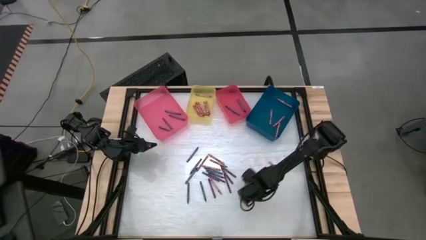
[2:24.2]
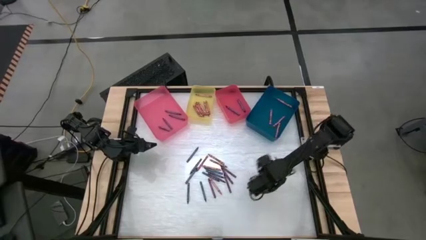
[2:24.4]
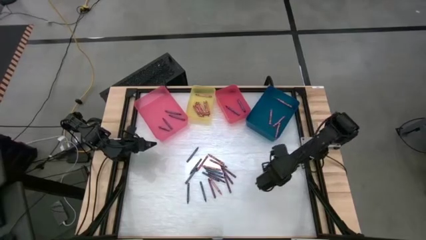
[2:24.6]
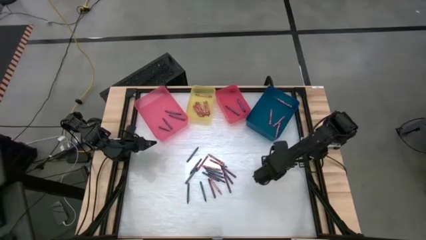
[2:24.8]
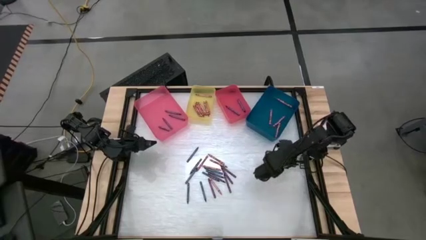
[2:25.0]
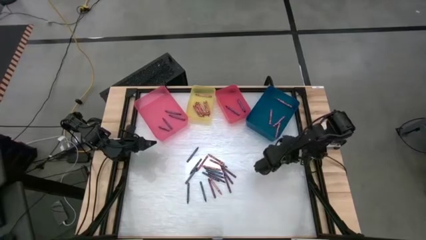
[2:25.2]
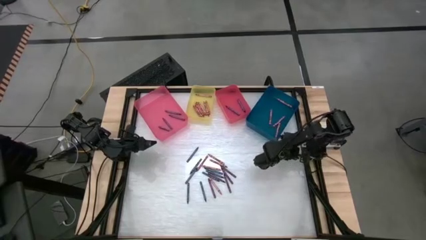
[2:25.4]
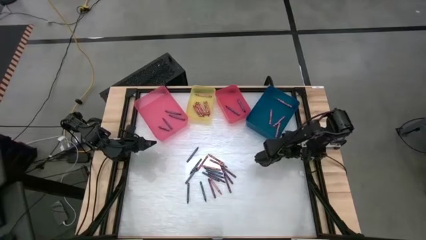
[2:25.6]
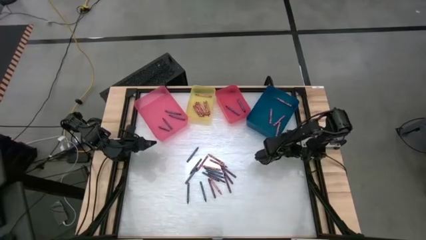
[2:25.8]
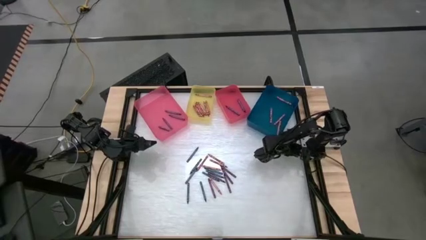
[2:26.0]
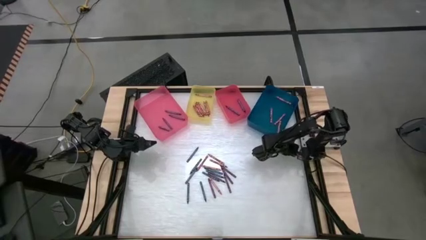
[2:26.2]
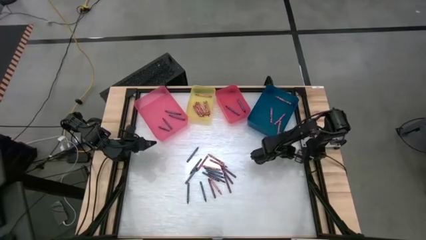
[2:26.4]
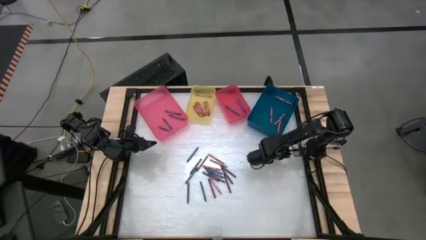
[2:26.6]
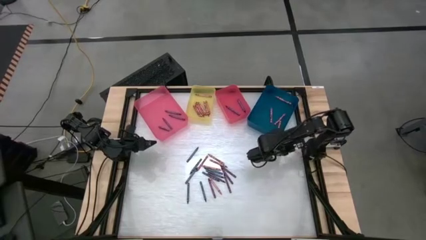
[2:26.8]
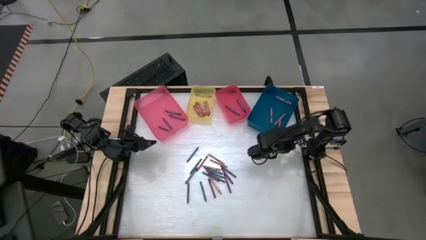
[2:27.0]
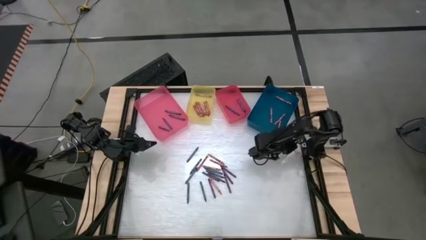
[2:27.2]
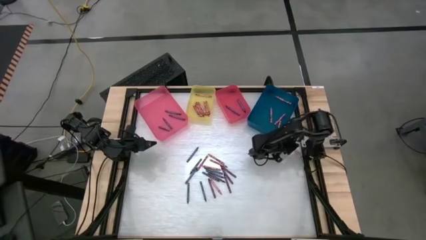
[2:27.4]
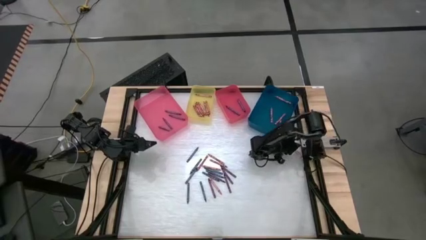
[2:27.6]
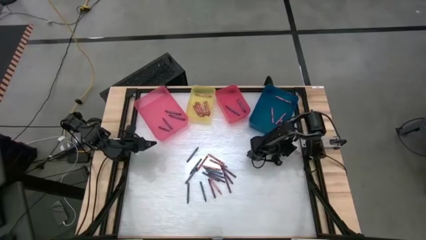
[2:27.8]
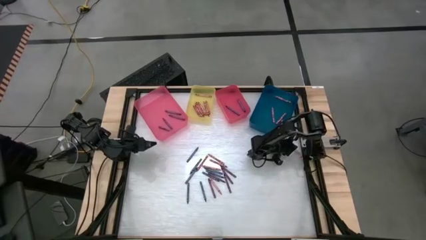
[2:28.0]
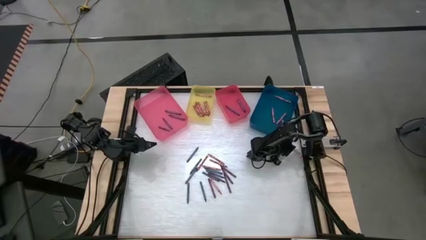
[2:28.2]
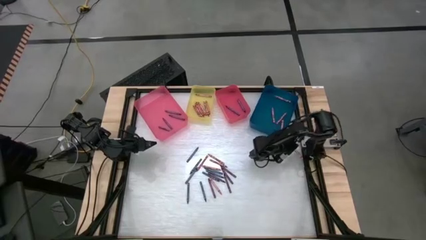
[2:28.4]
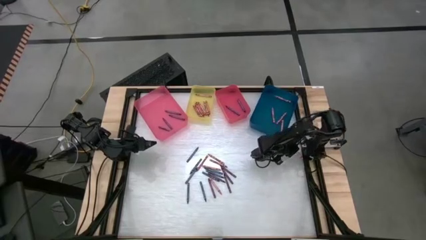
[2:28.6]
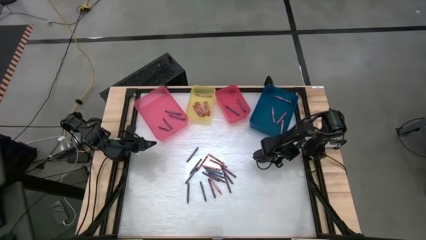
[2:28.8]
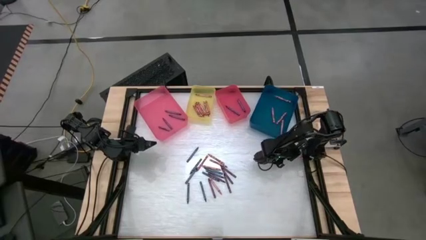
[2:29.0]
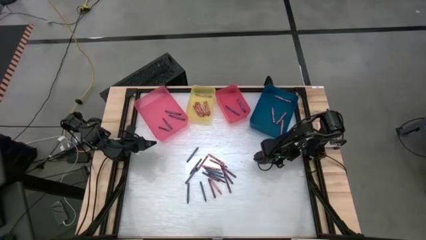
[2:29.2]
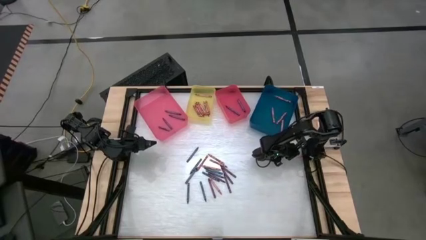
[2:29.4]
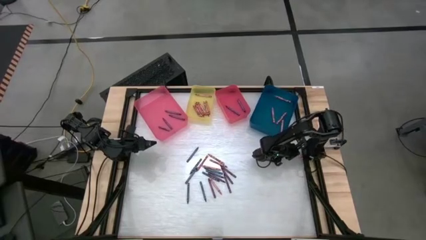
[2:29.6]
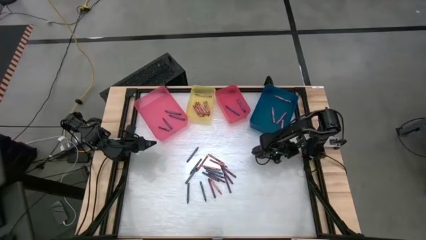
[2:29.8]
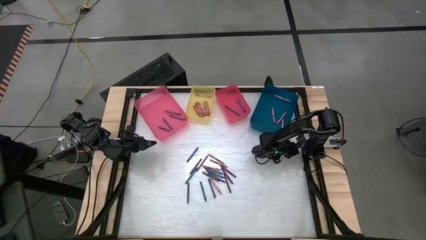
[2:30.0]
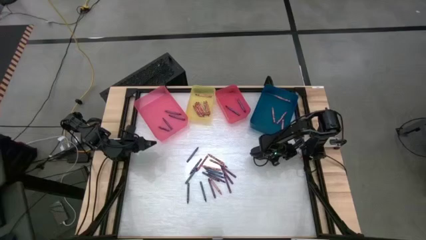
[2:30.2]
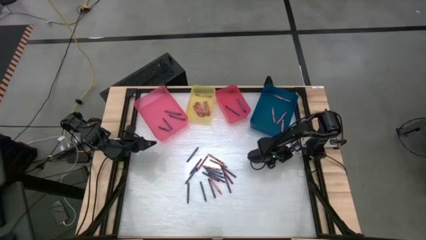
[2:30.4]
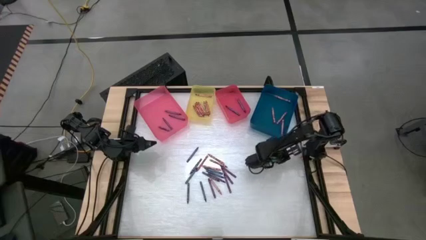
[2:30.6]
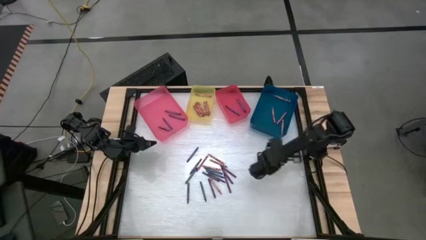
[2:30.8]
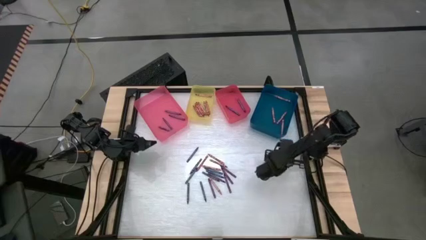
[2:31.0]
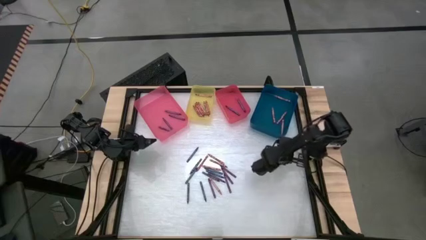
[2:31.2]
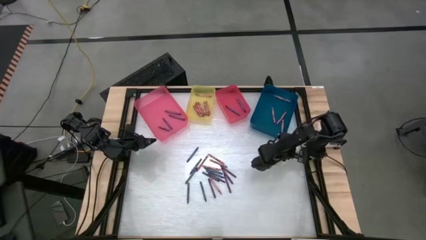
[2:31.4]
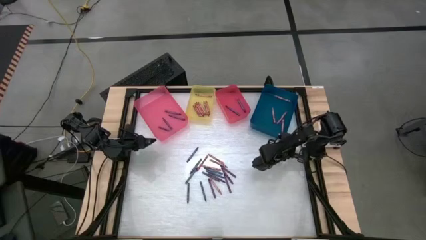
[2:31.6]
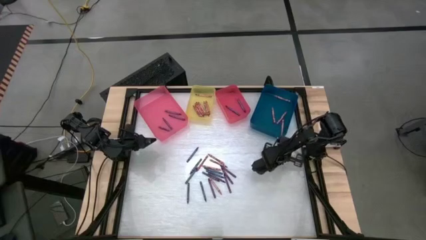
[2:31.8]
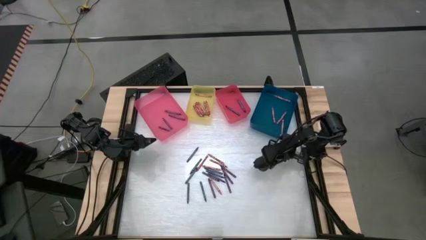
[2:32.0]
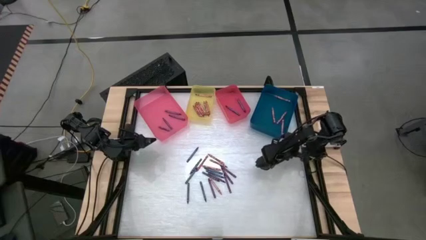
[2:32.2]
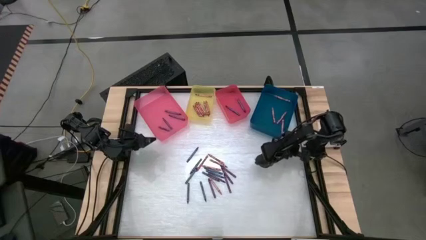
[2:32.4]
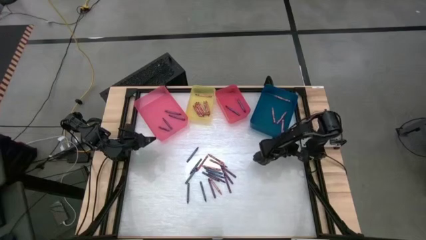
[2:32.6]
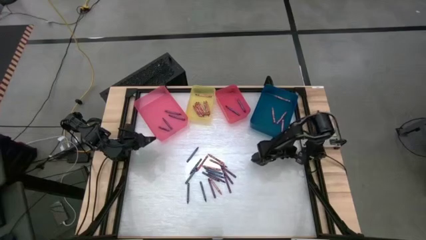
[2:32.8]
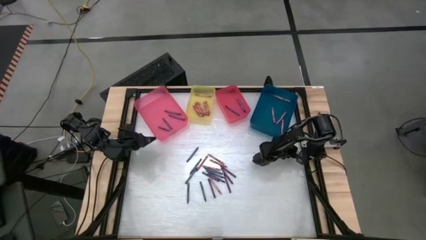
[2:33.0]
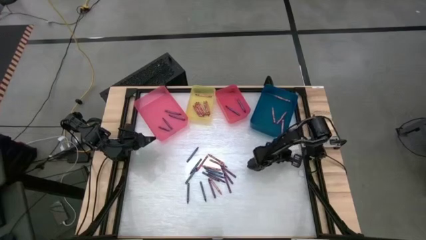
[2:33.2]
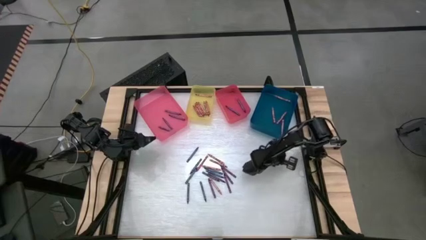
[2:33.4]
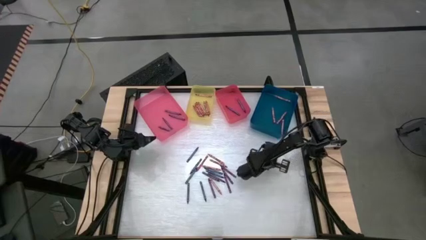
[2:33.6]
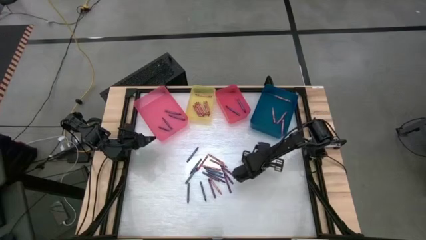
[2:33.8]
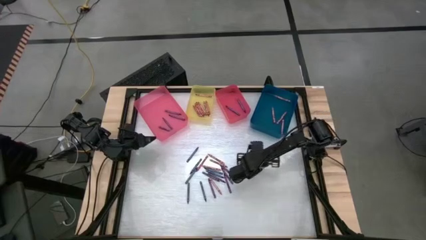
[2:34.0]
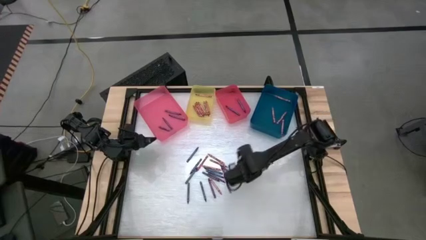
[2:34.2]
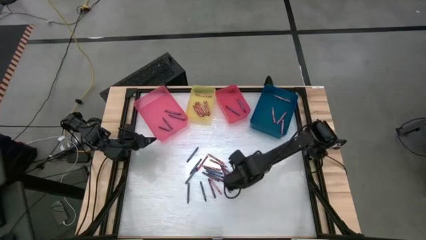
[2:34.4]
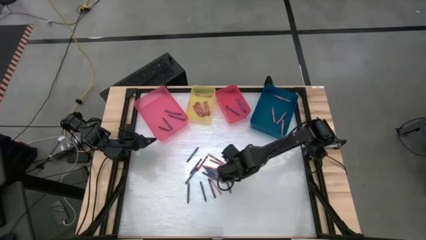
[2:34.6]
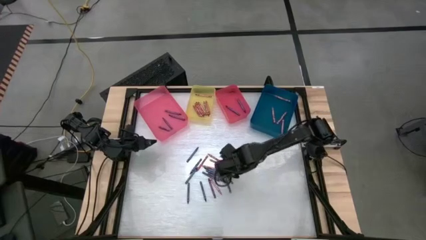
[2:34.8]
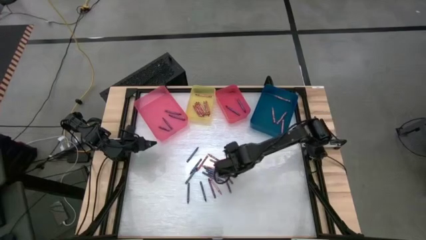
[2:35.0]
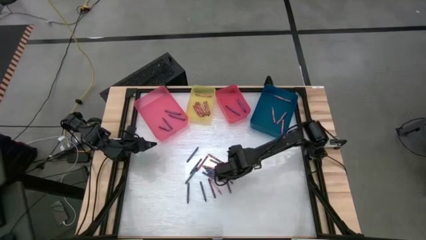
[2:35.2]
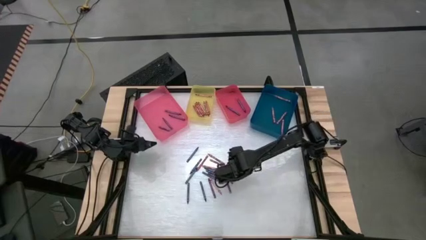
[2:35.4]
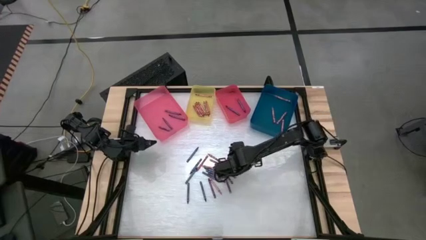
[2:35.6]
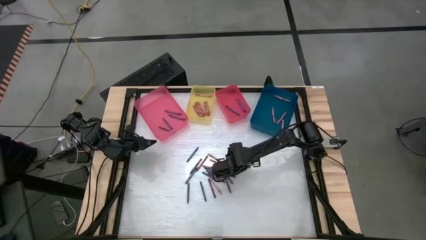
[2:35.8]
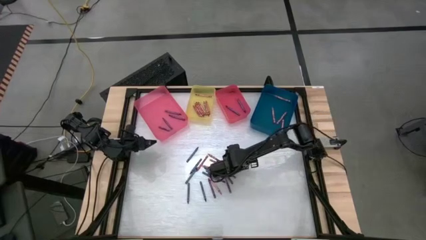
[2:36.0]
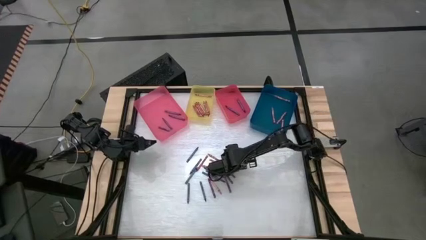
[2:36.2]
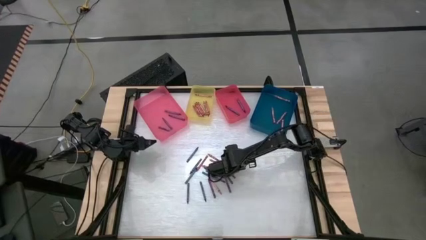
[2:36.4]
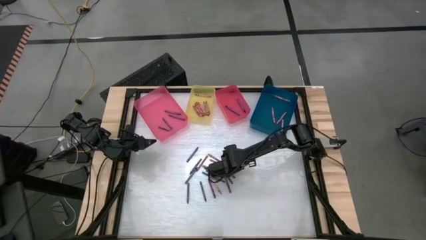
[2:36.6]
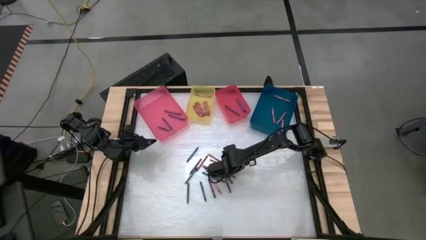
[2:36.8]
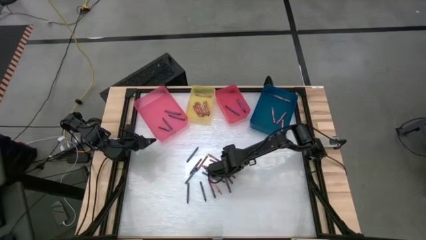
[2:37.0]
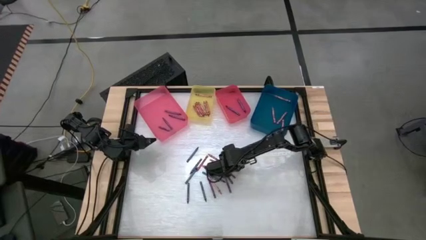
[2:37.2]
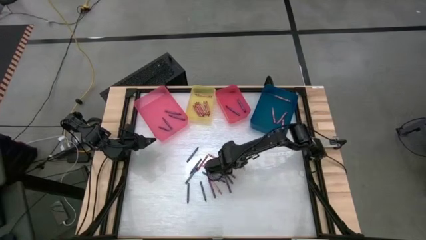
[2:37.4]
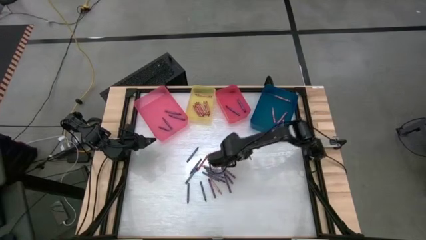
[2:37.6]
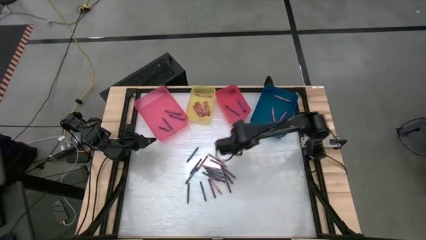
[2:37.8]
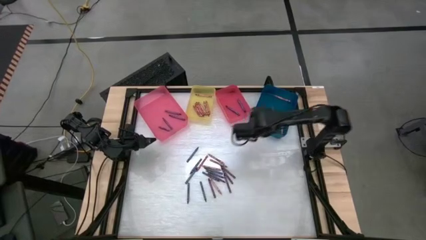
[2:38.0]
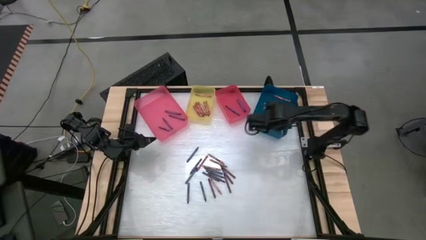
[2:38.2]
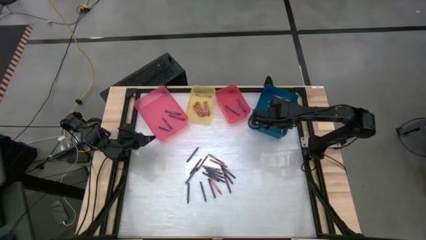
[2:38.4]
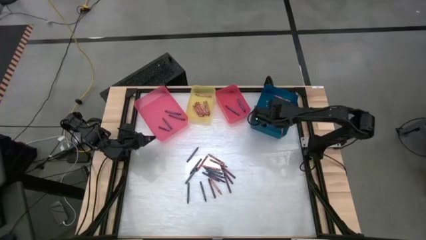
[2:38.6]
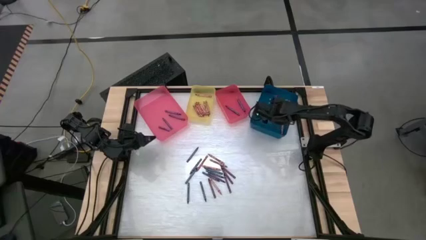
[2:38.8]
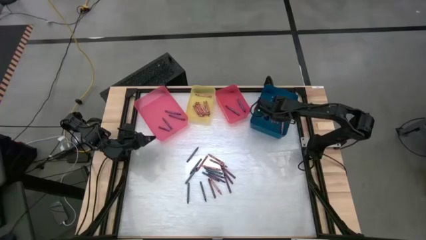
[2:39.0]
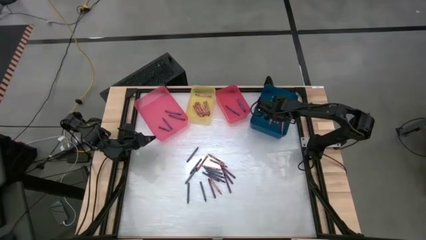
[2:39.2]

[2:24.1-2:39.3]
Task: Sort crayons
Put the pink crayon into the blue bin
